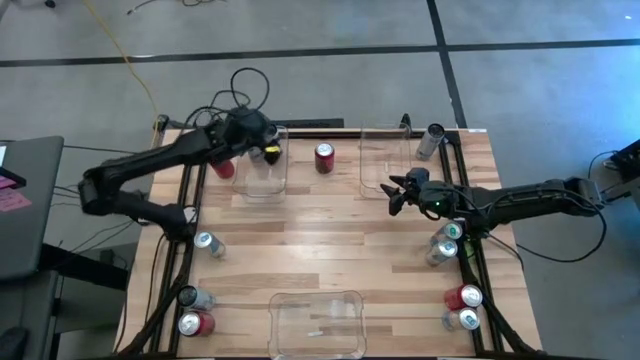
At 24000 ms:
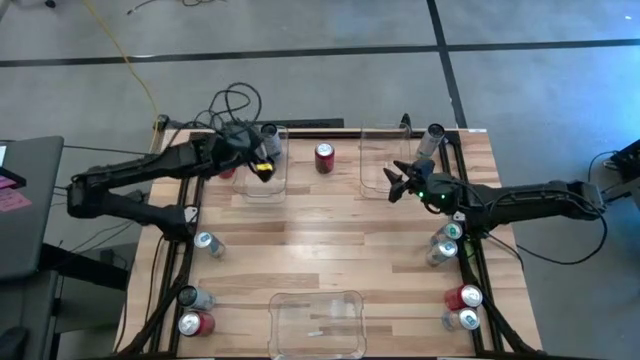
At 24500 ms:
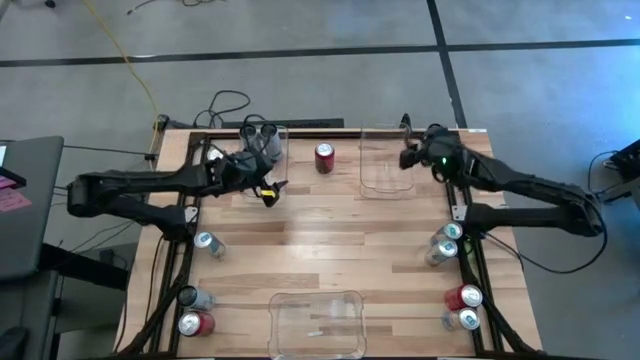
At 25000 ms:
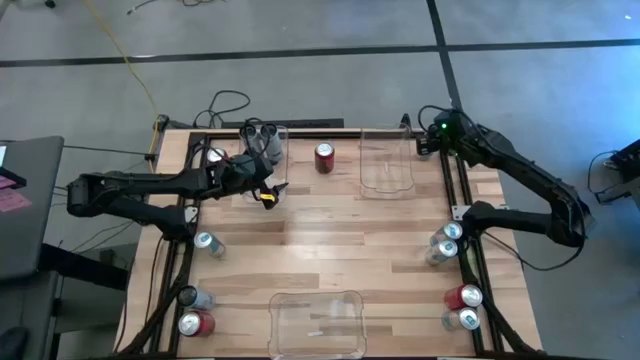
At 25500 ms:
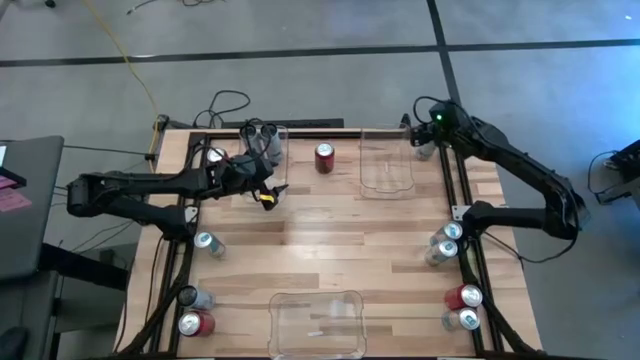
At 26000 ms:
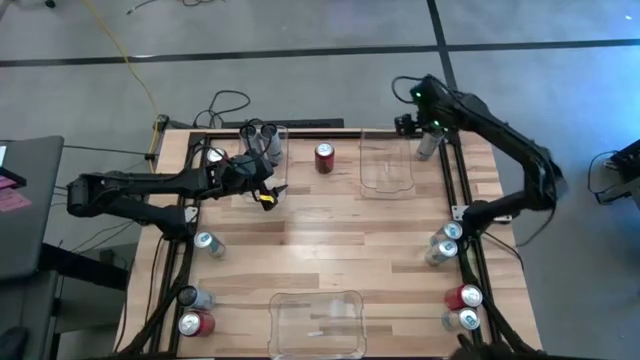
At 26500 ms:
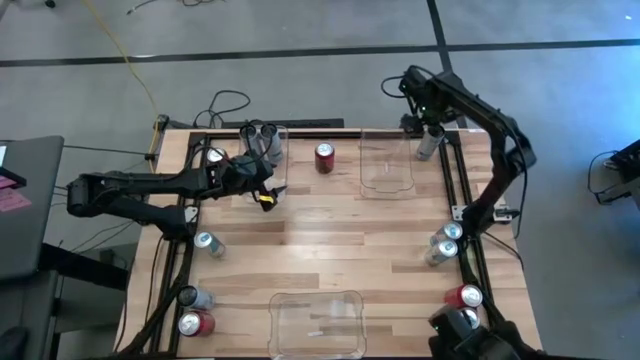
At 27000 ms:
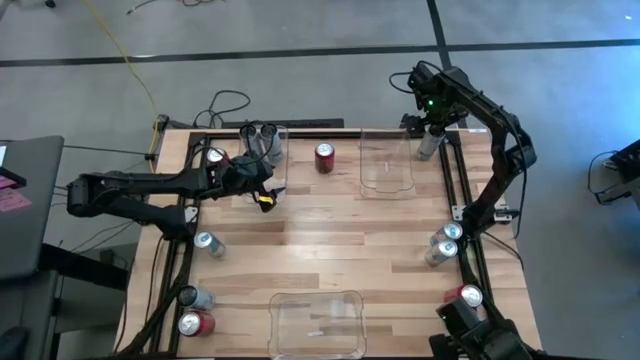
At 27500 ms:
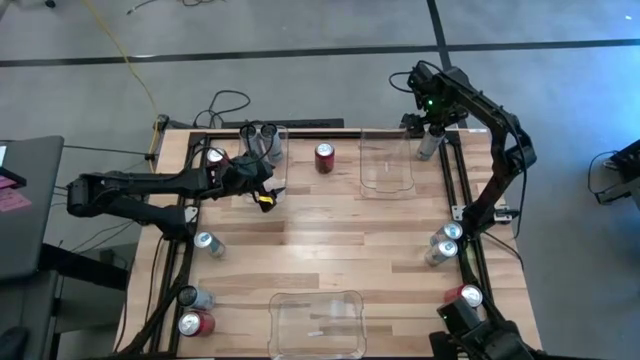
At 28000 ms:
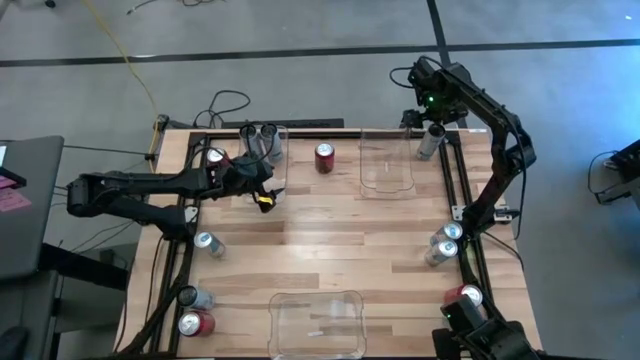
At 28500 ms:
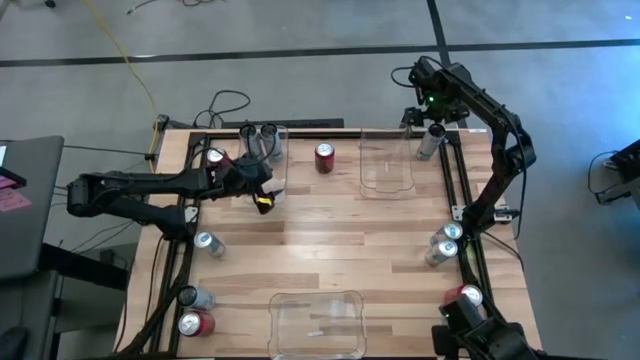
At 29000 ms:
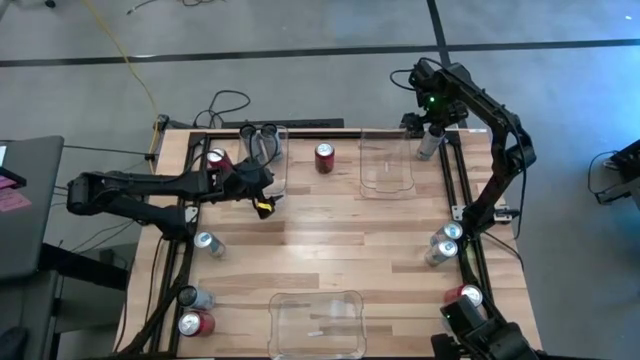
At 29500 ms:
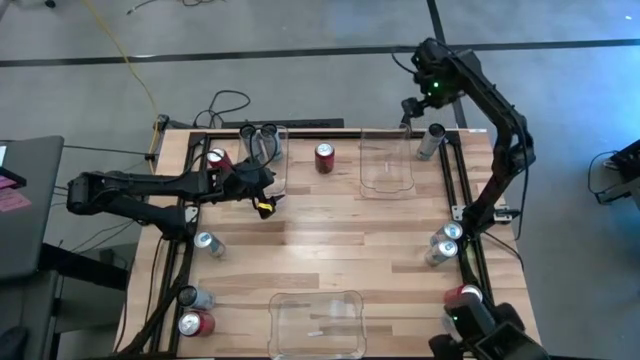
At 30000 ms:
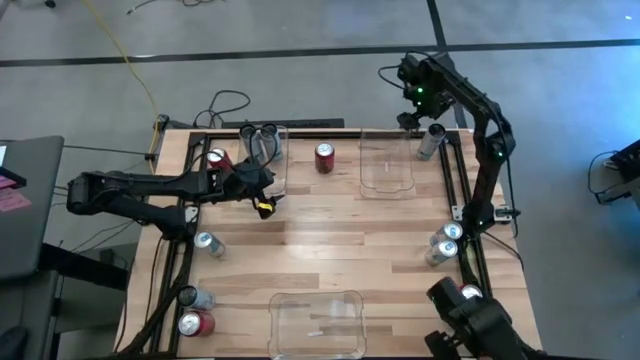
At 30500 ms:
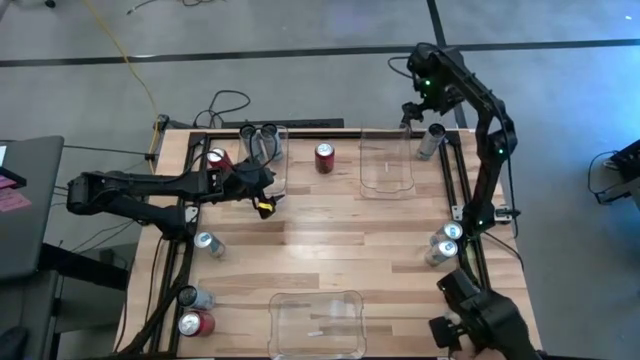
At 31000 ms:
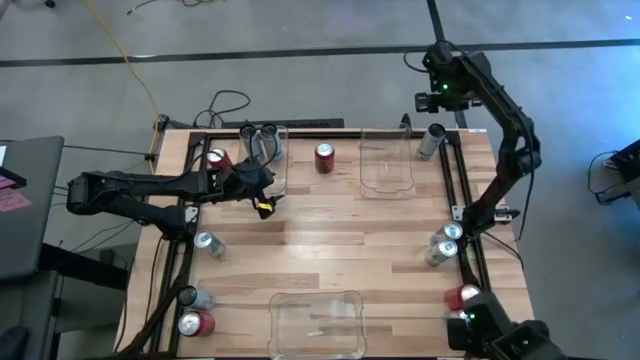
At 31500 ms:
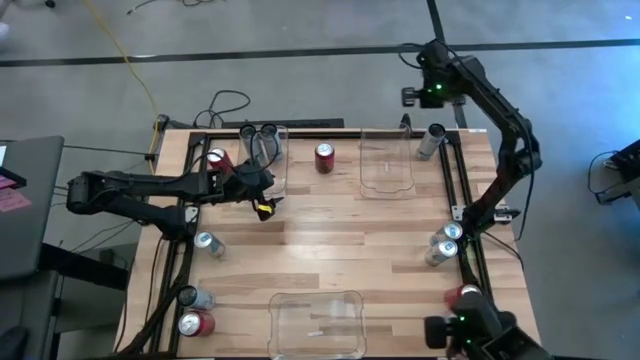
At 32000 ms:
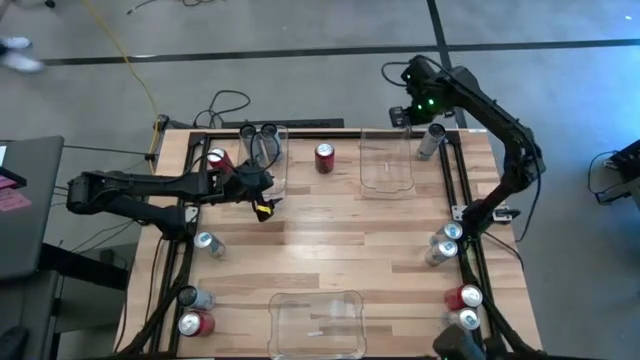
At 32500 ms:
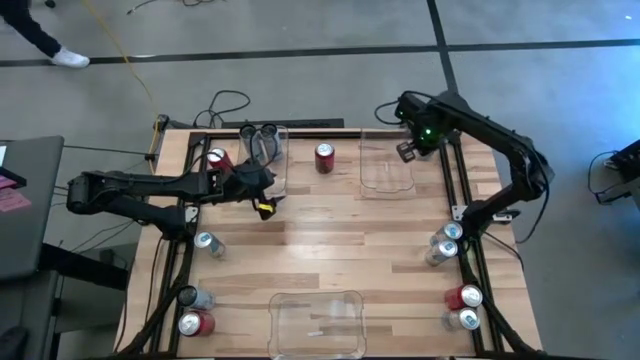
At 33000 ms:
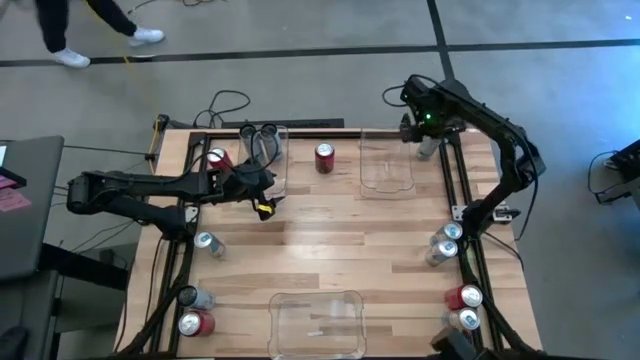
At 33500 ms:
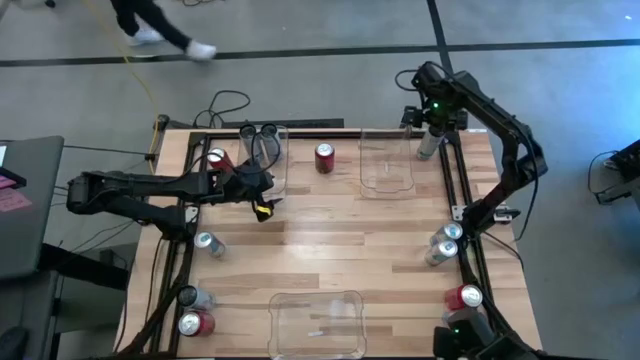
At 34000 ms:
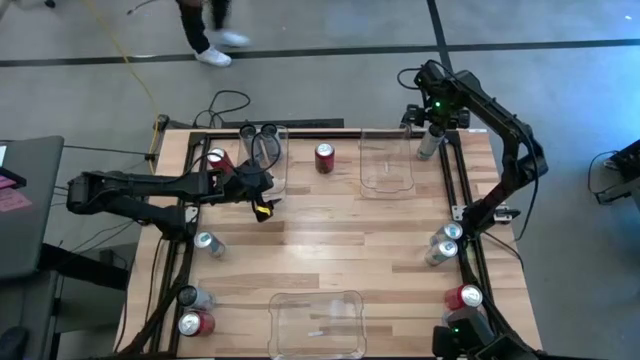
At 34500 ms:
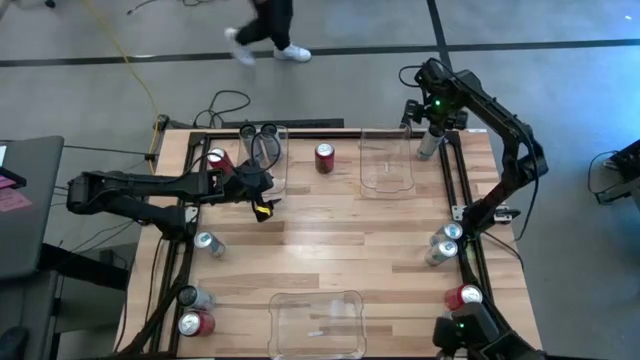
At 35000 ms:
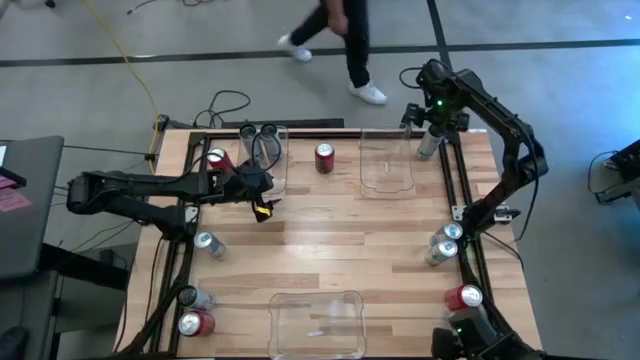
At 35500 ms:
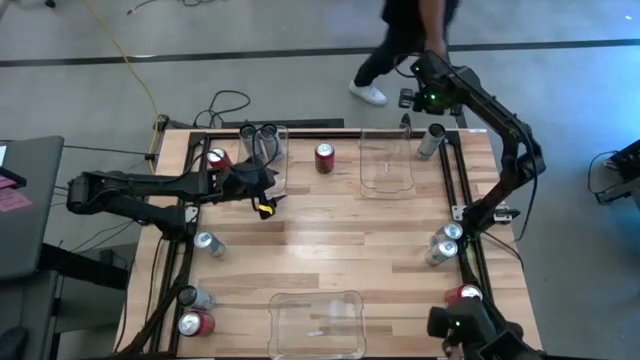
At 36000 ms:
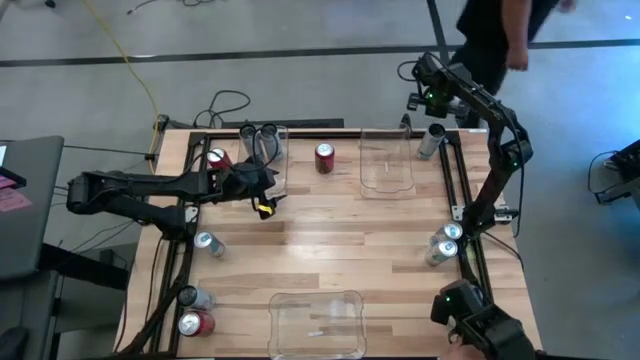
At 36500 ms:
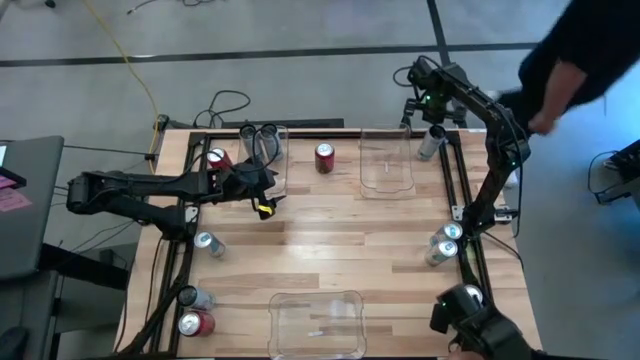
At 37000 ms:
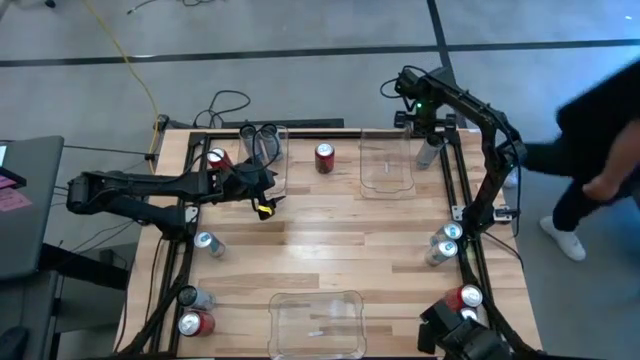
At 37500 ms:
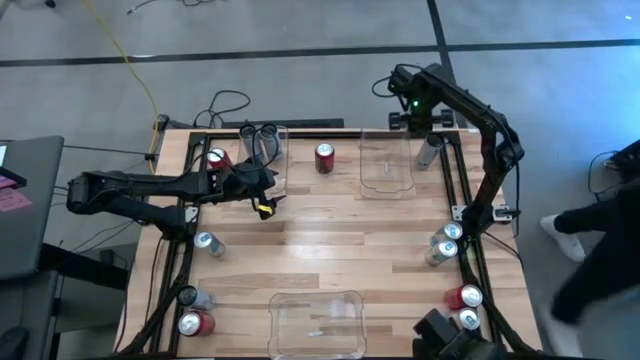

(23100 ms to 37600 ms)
Task: Sort soda cans
Put the top white and blue soda can into the top left transparent bin

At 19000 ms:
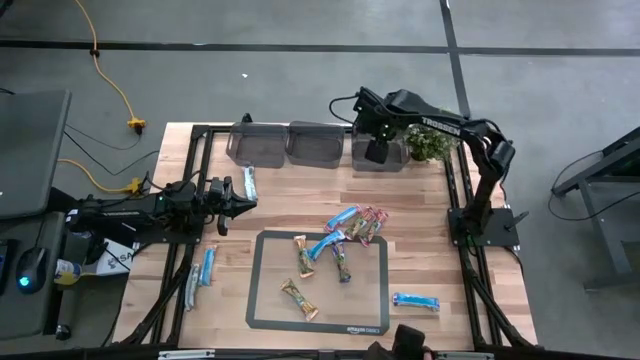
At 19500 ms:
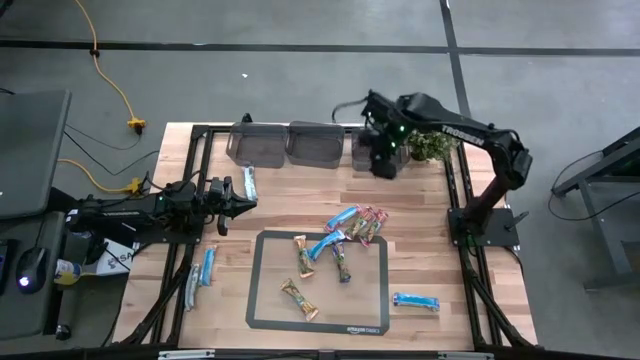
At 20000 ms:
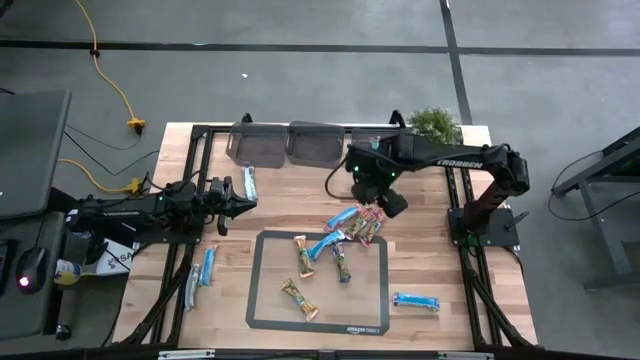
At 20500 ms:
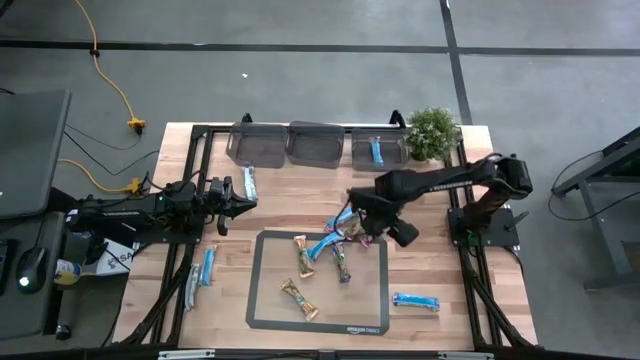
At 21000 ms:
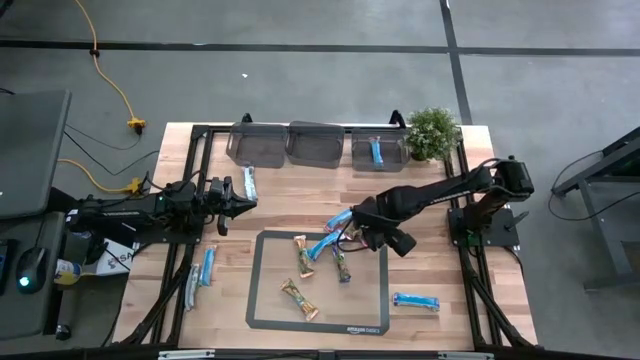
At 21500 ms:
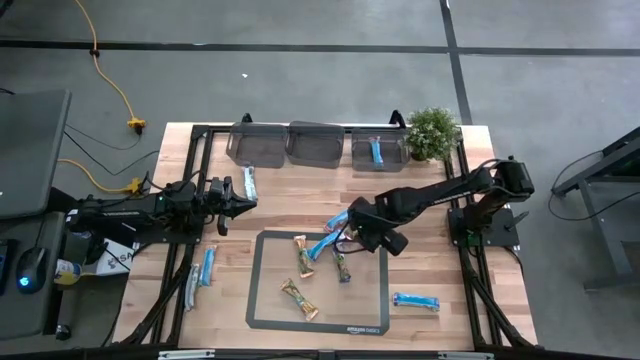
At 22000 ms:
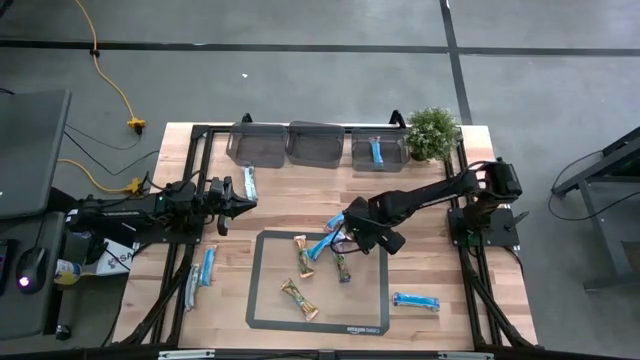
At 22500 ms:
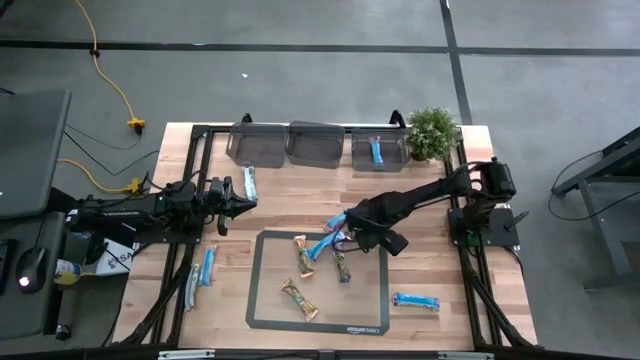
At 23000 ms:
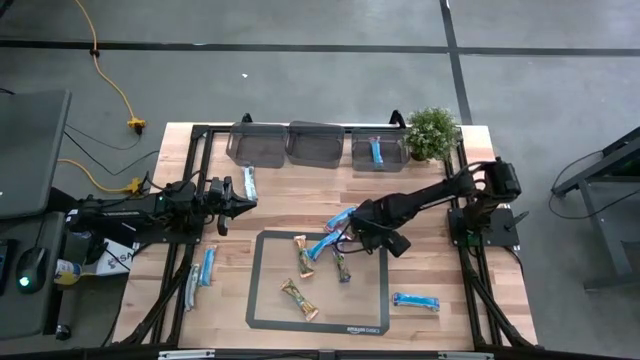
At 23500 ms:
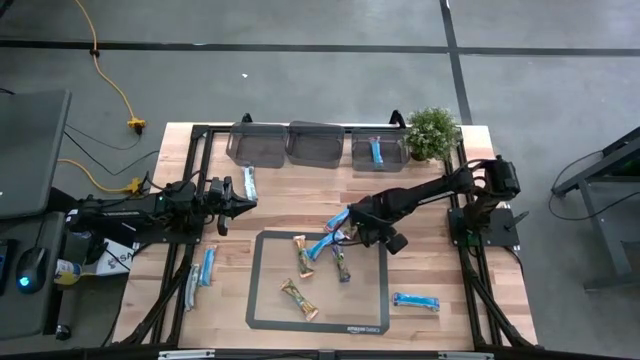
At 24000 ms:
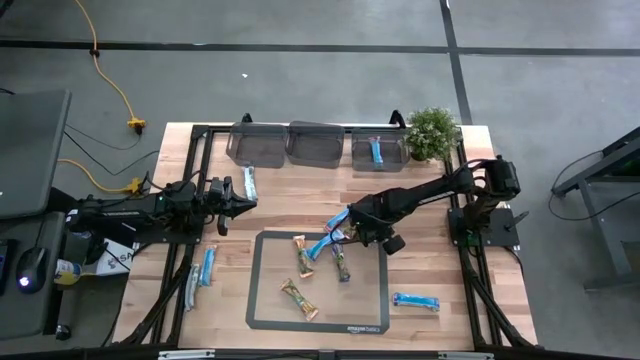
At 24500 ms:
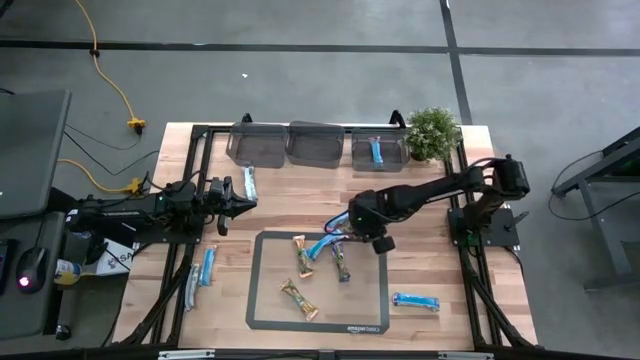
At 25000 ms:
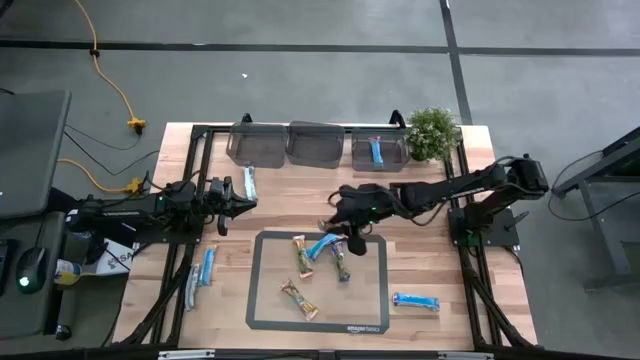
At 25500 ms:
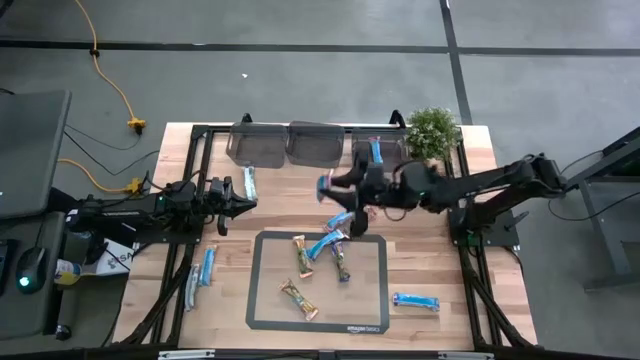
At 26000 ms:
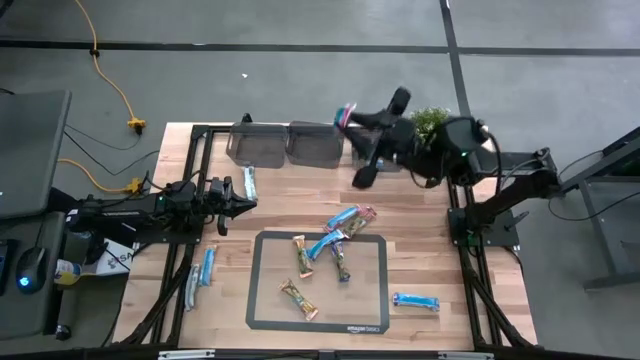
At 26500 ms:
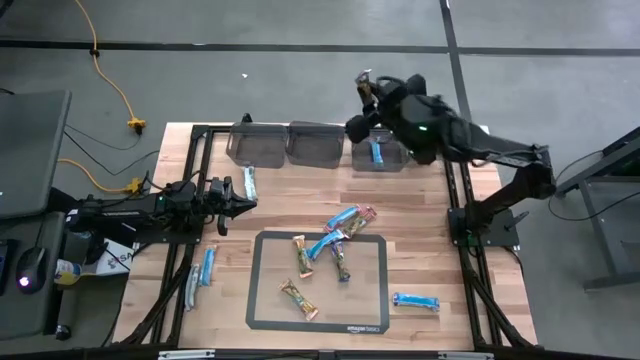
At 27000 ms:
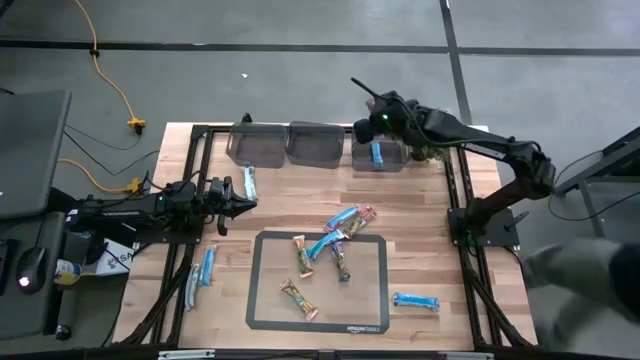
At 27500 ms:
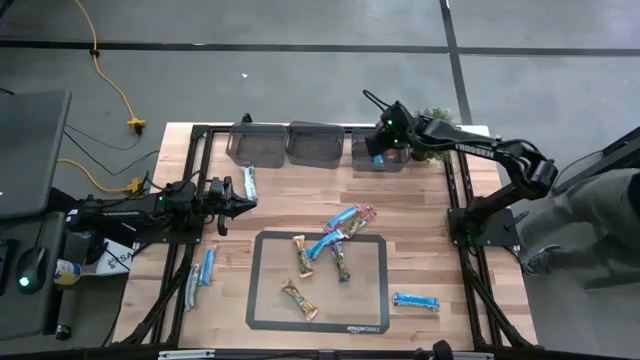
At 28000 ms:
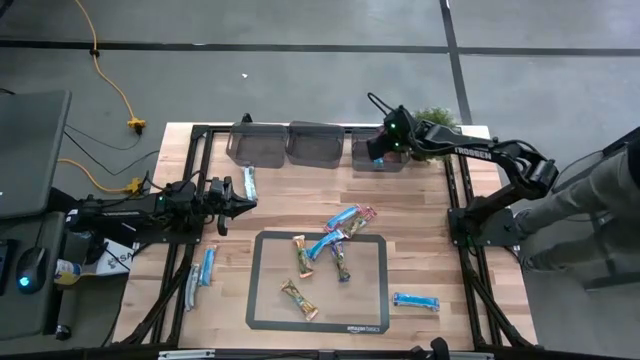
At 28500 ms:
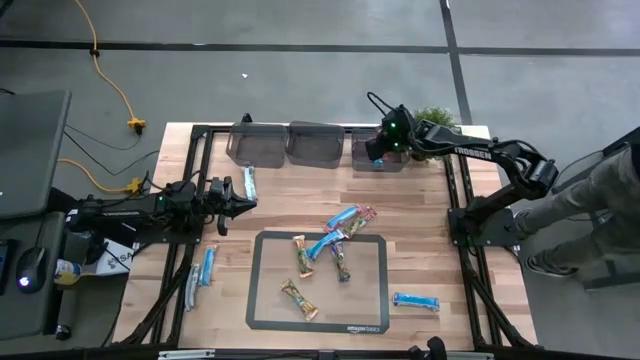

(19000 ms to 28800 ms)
Task: Pick and place Granola Bars by type
Put the red granola bar into the right black bin
